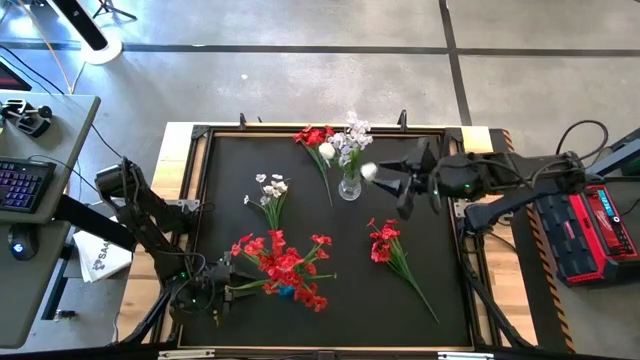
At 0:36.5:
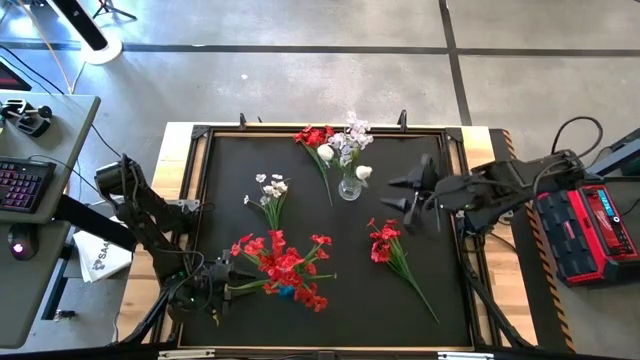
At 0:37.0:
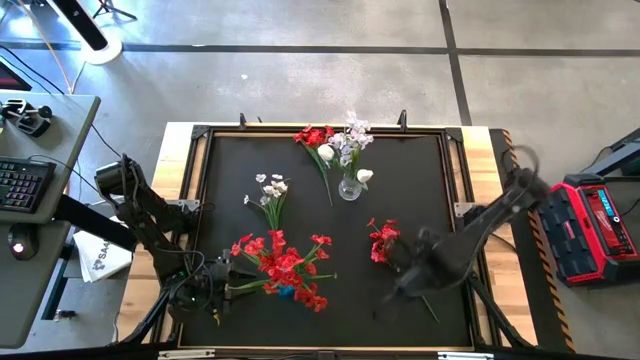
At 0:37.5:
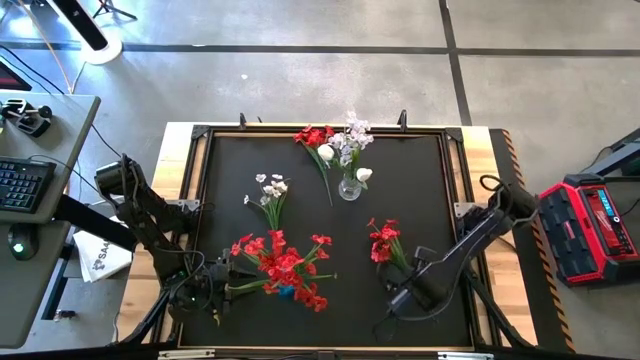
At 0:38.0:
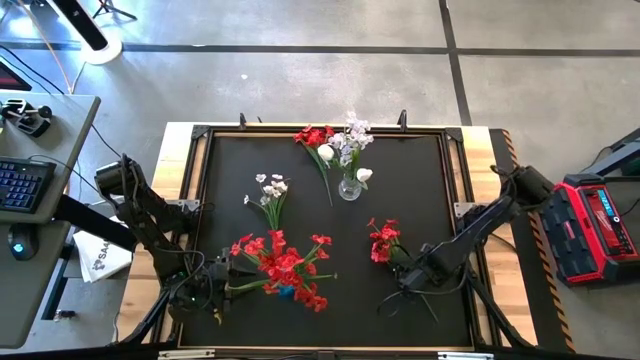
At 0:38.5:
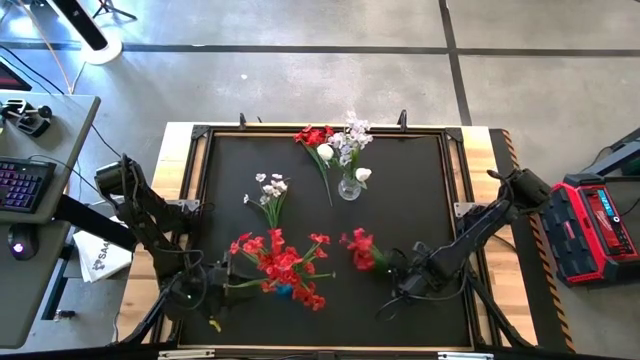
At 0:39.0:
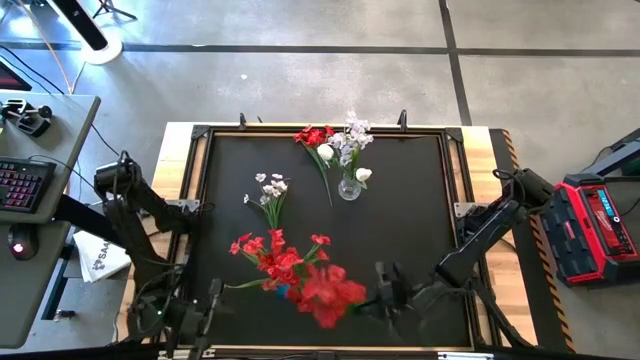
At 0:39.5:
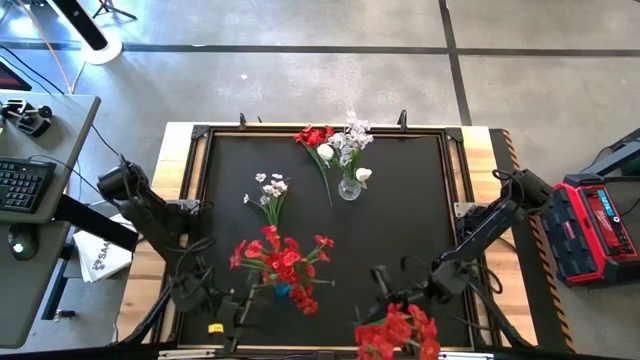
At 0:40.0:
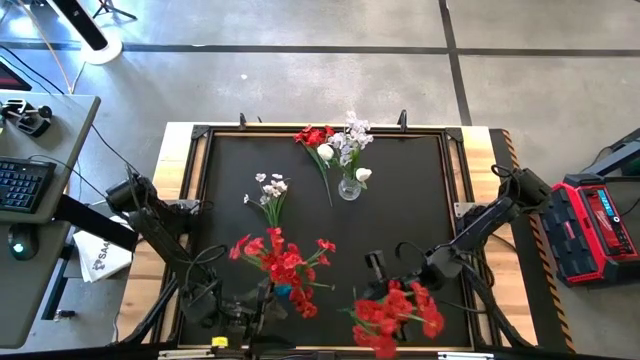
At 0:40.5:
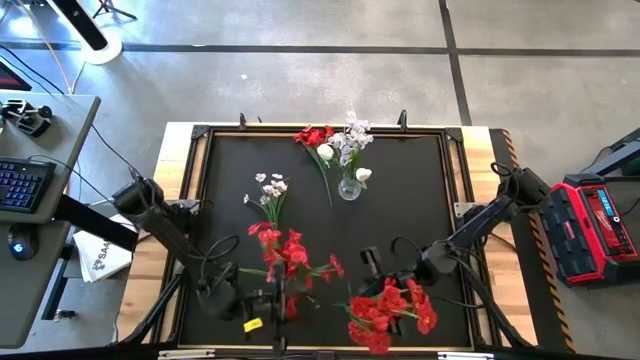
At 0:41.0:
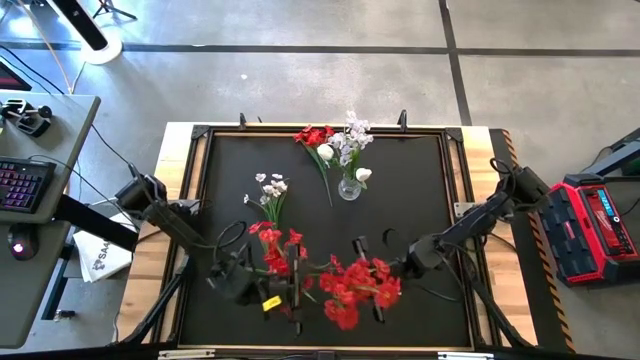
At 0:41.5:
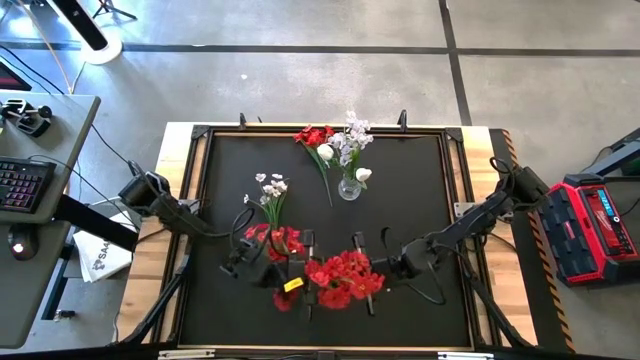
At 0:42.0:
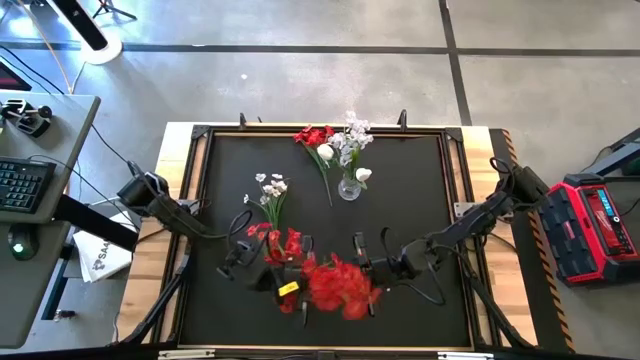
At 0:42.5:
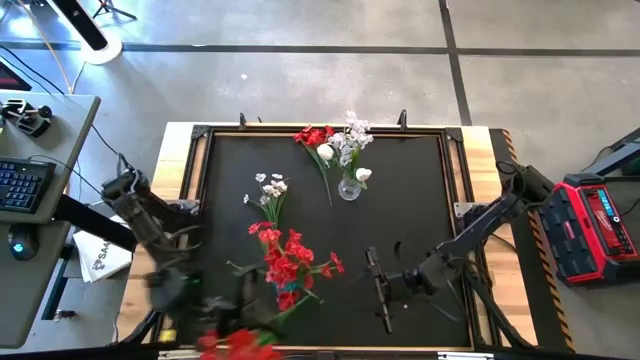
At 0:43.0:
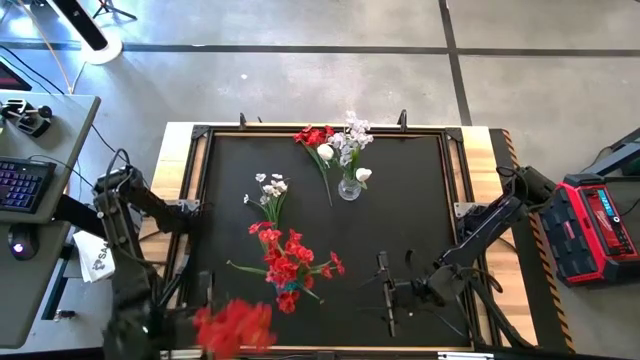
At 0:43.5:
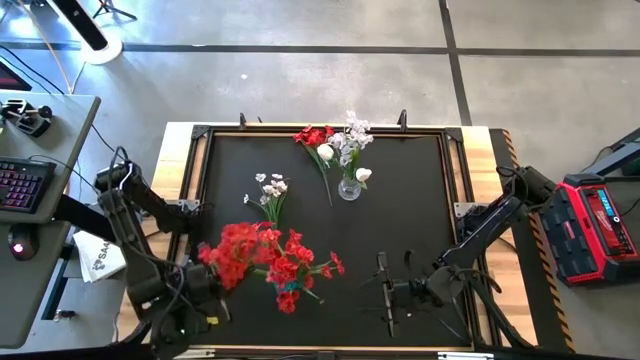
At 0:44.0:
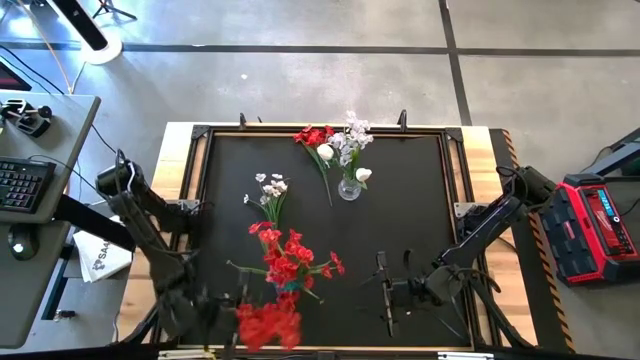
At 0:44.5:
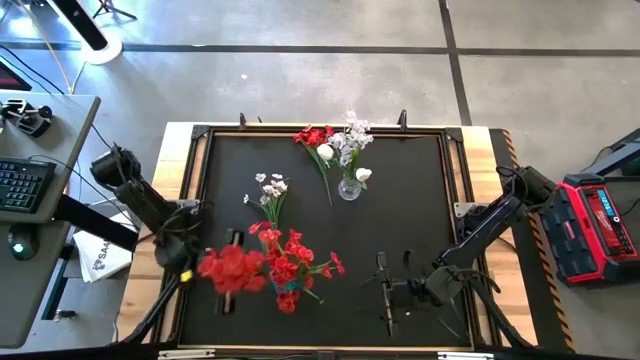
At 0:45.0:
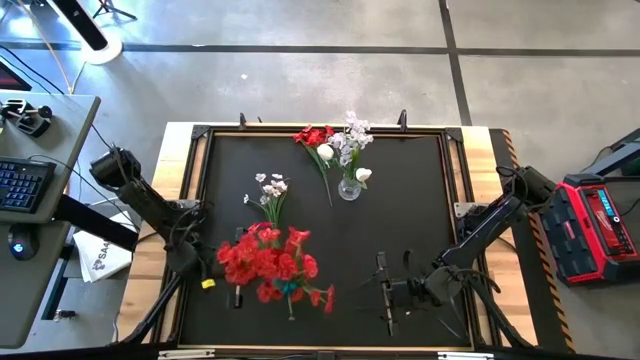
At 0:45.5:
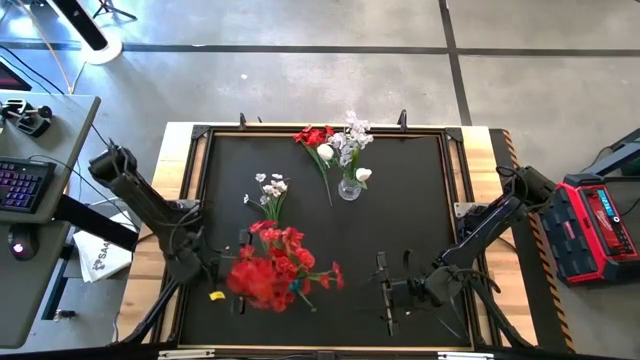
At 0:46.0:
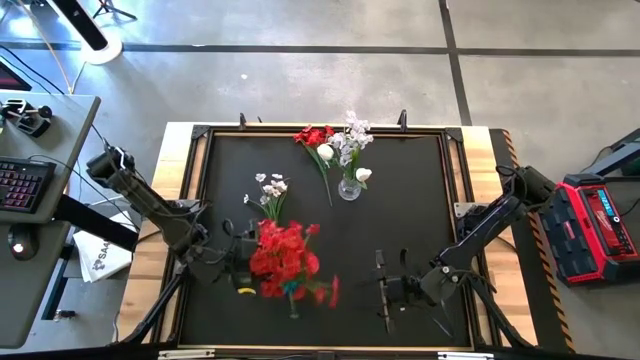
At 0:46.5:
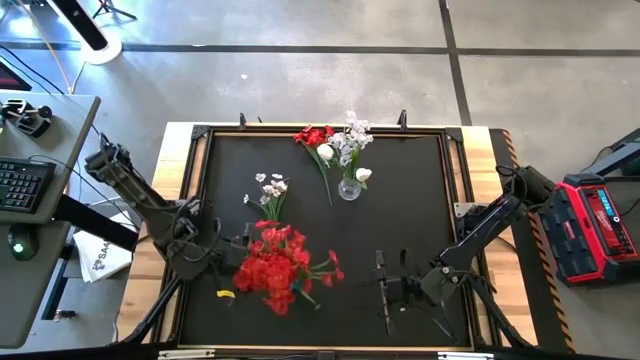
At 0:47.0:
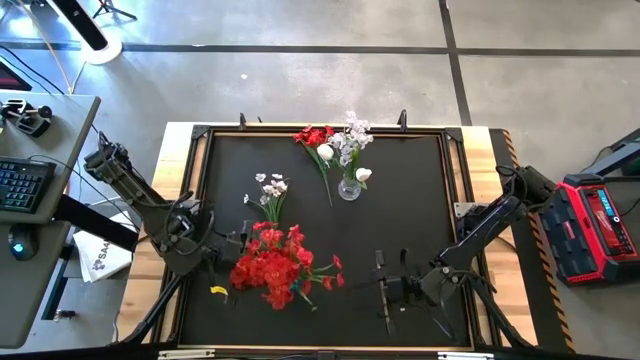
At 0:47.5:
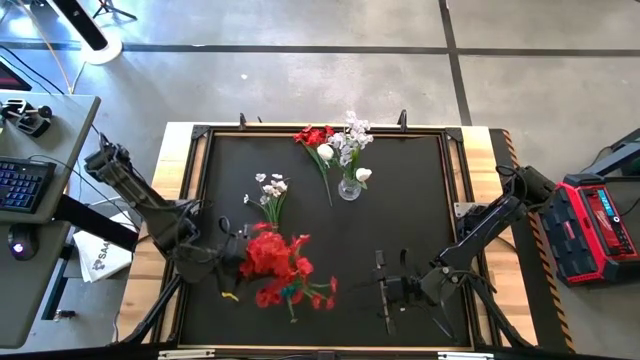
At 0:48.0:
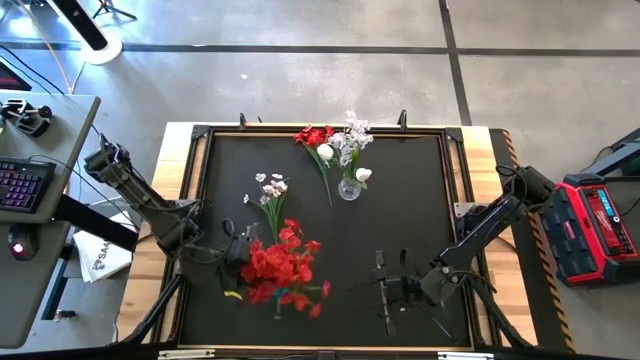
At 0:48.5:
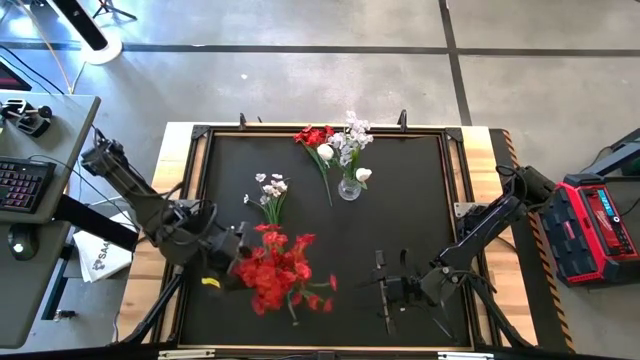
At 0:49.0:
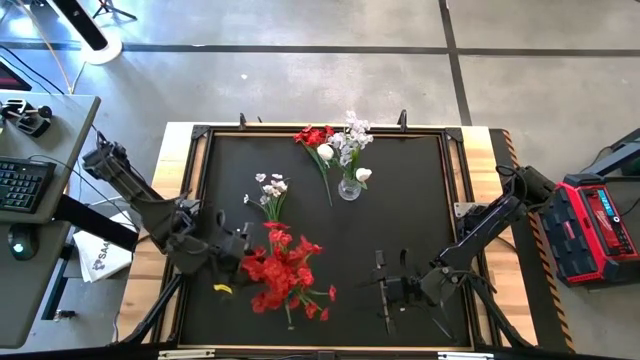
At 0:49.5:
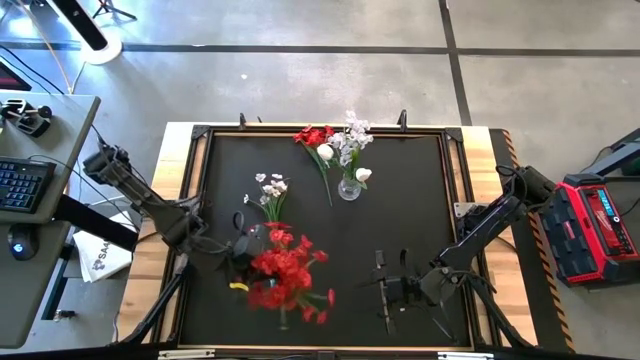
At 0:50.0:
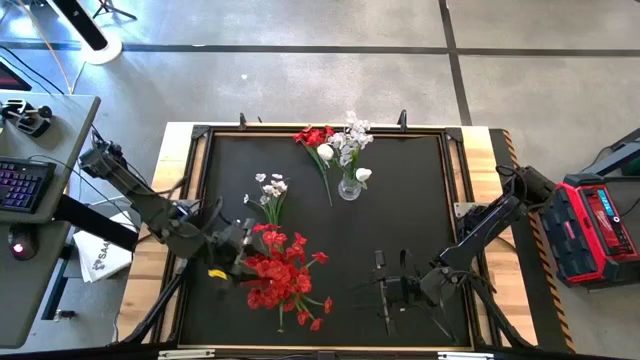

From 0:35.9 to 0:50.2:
Task: Sort flowers into vase by color
Put the red flowers into the blue vase

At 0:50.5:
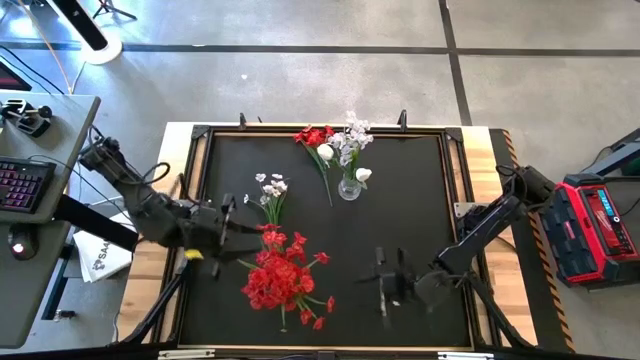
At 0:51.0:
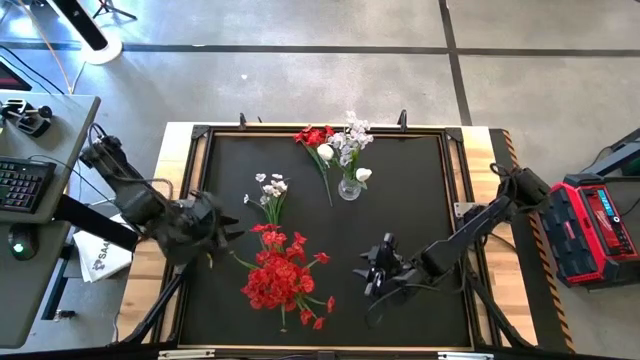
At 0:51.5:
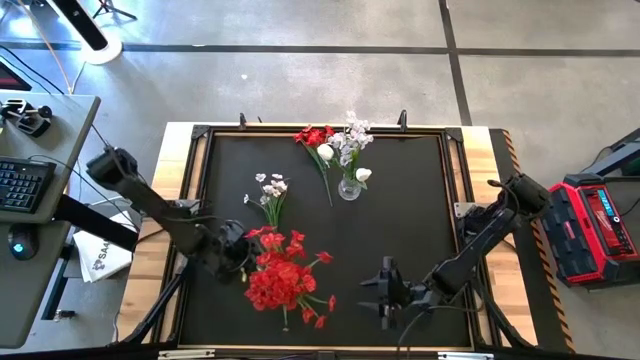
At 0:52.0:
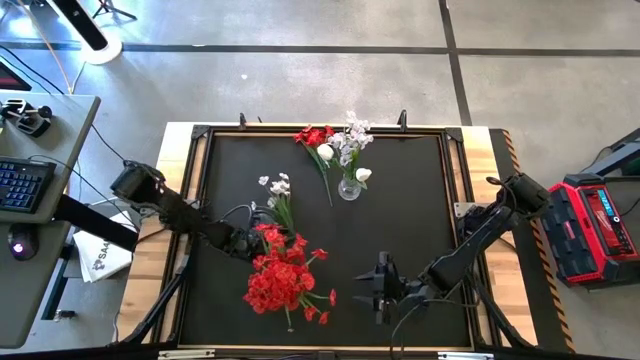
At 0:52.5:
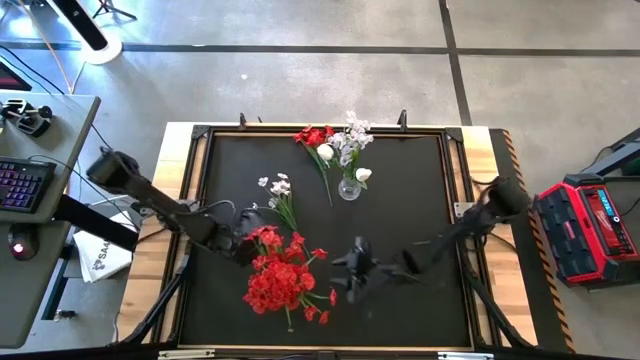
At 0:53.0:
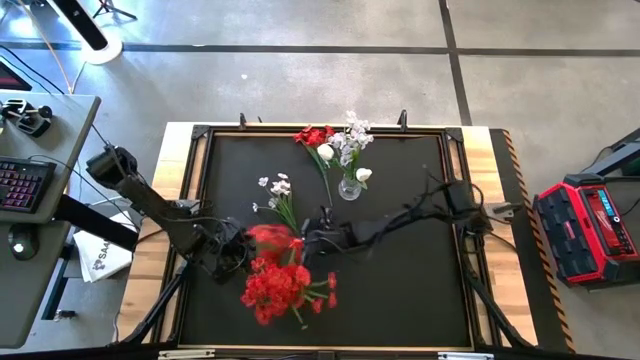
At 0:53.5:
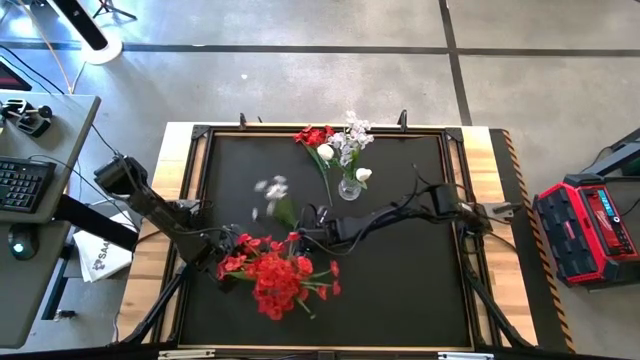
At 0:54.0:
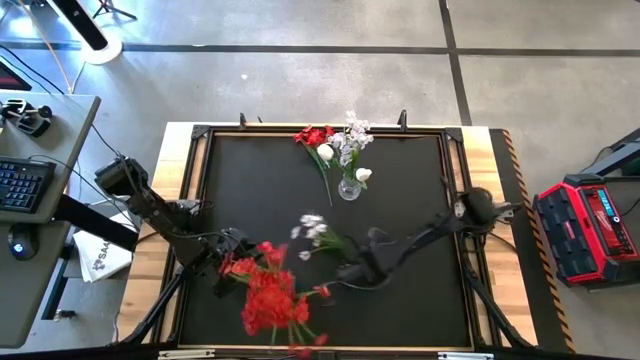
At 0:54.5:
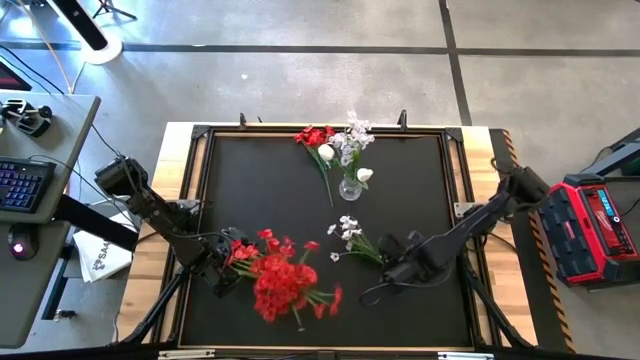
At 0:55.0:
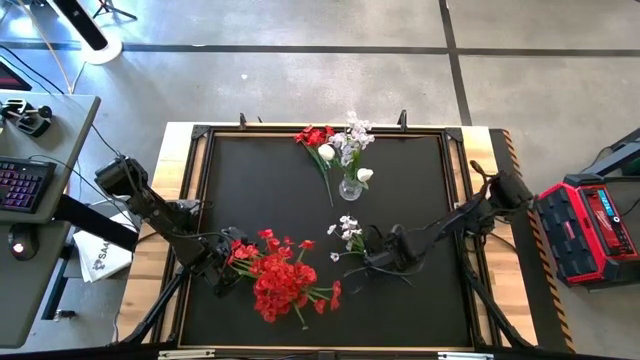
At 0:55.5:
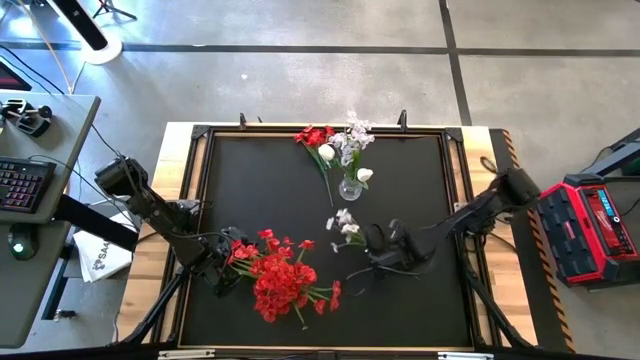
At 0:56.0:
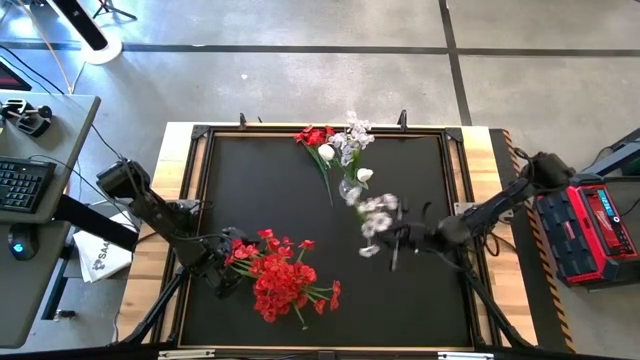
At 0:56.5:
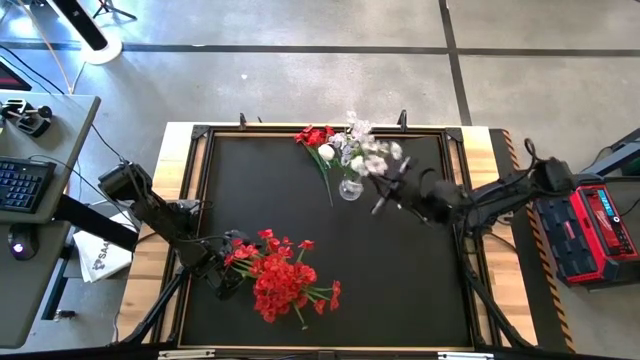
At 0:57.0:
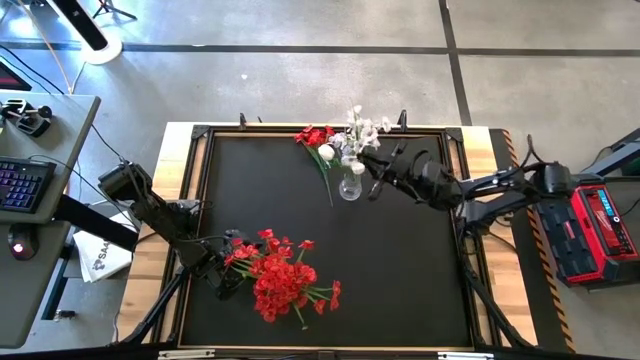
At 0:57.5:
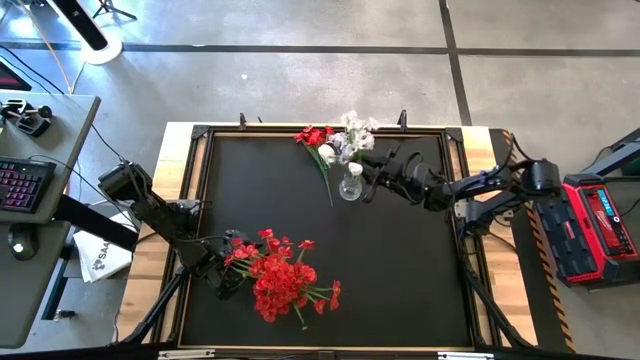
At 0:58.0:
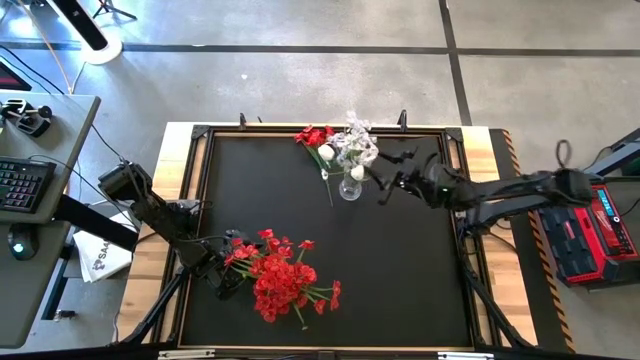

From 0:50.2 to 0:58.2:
Put the white flowers into the transparent vase

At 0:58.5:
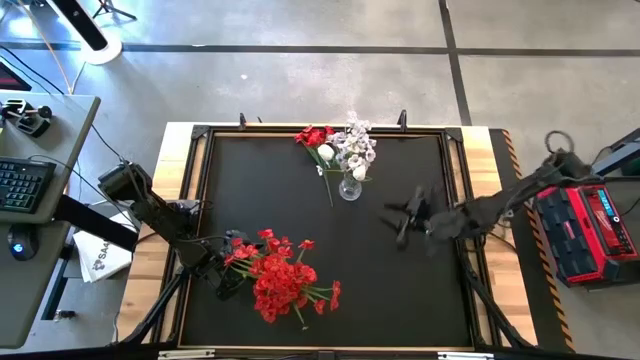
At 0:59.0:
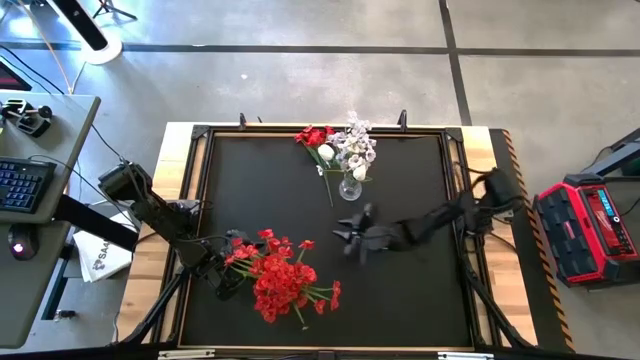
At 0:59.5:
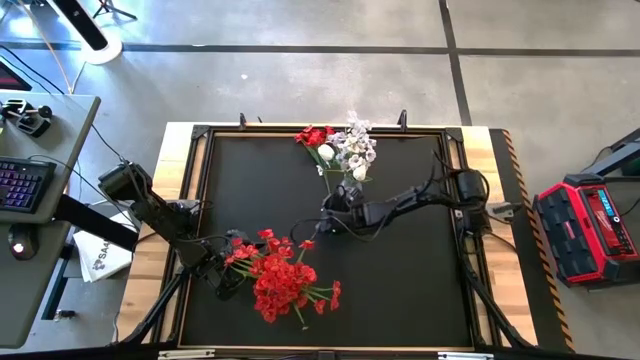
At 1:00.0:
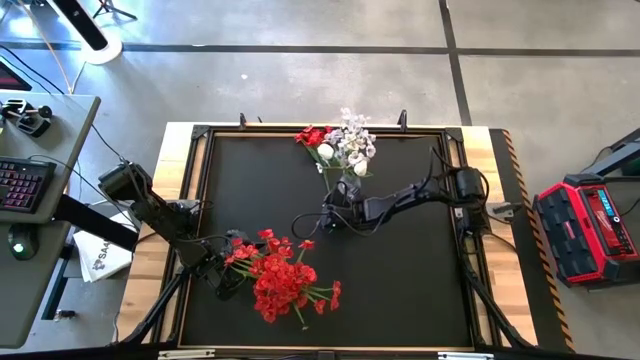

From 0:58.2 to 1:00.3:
Put the red flowers into the blue vase
